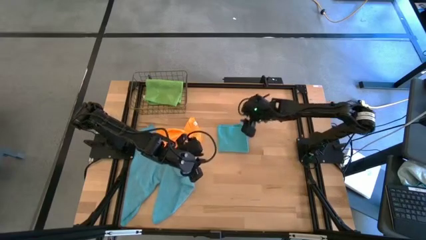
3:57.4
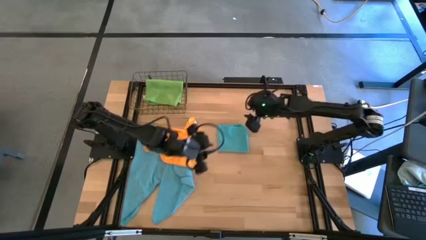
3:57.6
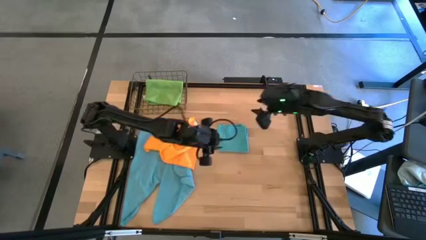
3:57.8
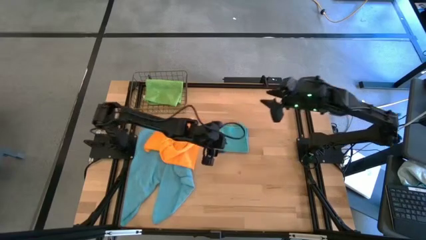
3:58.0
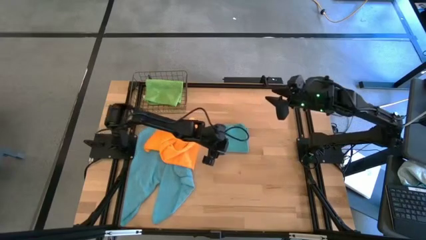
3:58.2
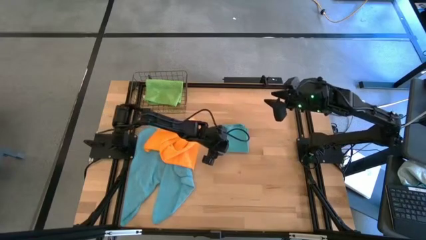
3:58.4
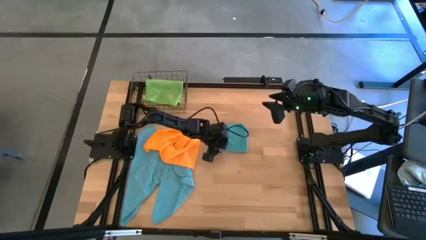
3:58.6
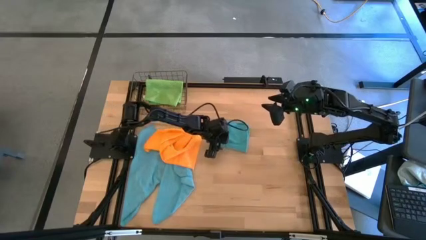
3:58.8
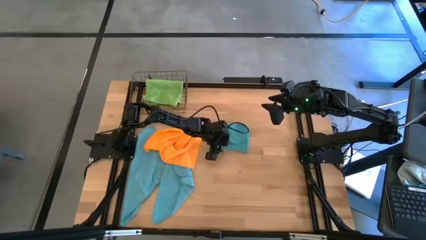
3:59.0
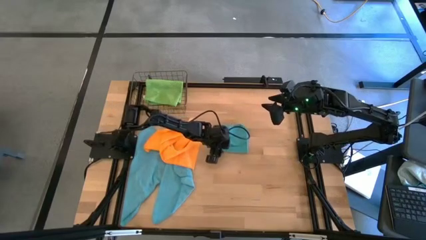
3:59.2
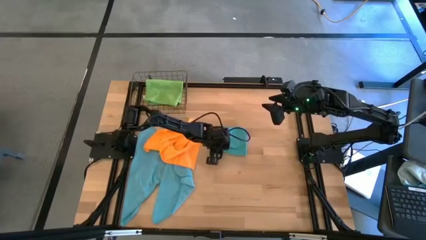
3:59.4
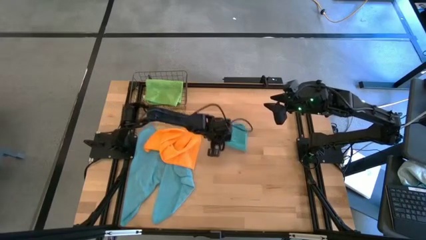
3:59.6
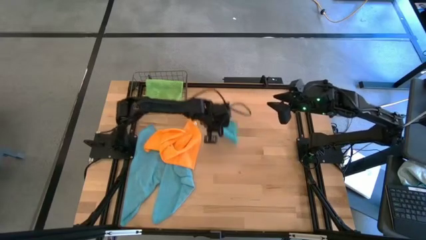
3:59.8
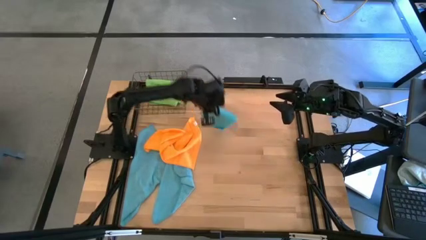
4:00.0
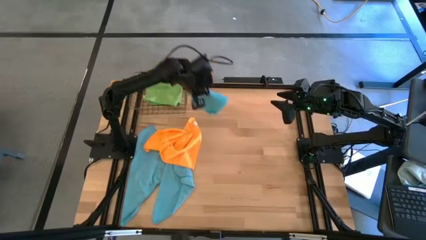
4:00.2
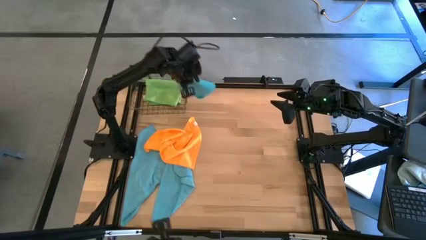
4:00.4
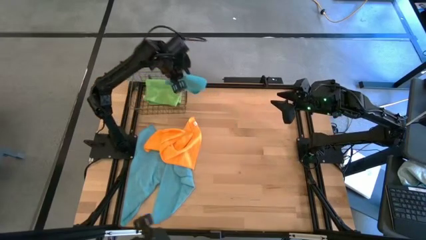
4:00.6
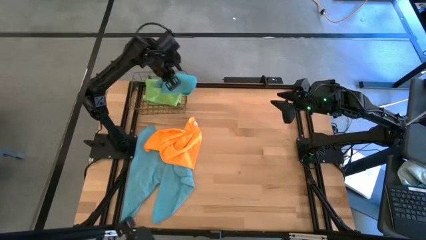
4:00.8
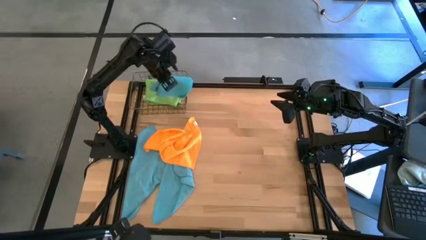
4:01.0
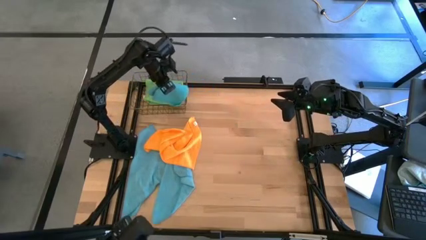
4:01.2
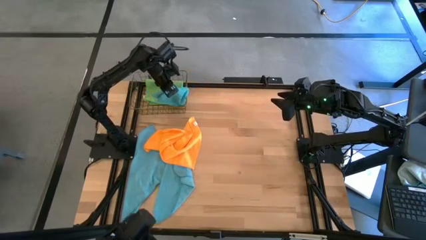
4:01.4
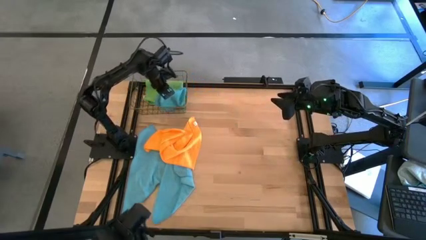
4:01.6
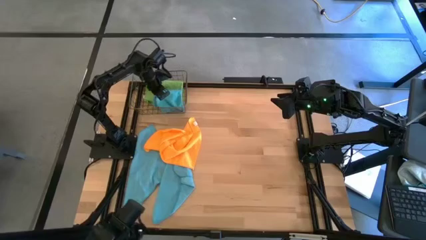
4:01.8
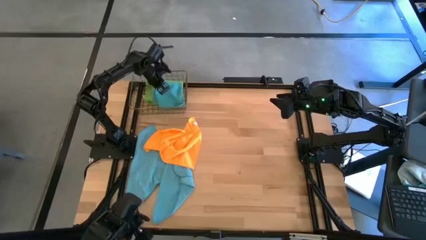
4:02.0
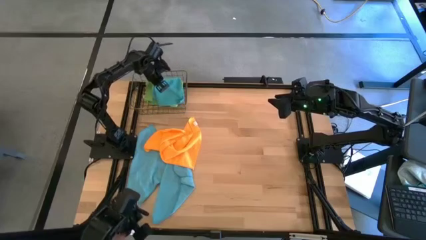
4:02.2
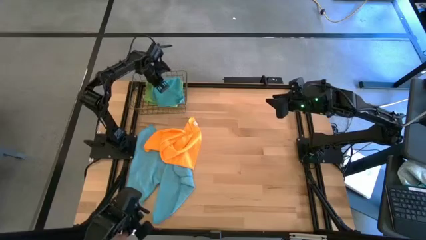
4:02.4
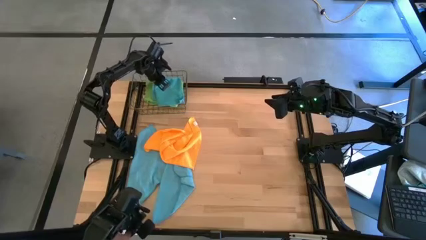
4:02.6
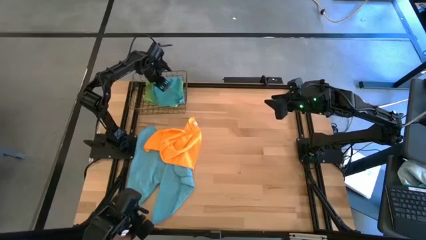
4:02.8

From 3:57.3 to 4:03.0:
Task: Fold microfiber towels
Put the folded blue microfiber cloth into the wire basket

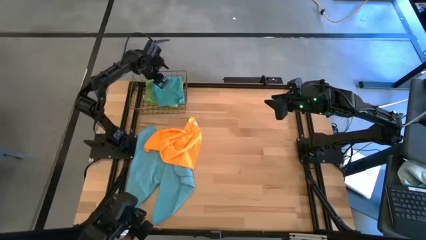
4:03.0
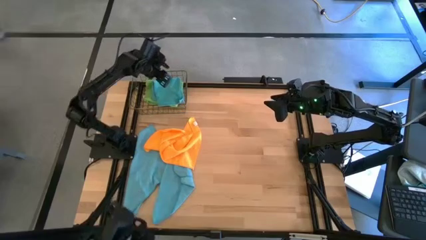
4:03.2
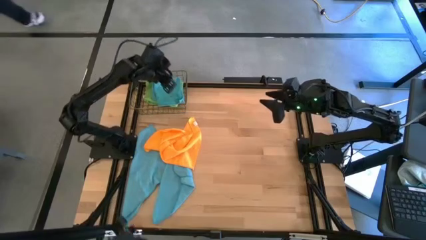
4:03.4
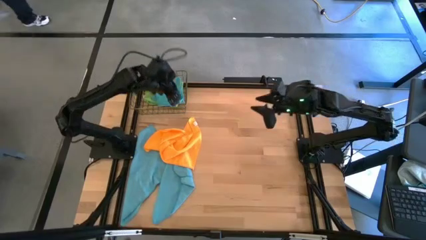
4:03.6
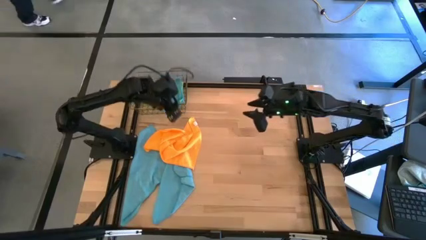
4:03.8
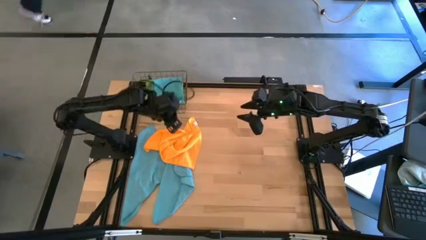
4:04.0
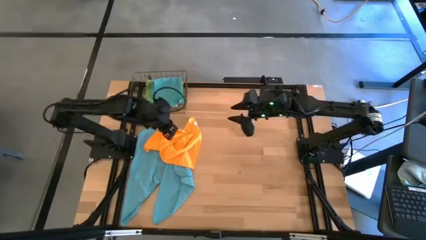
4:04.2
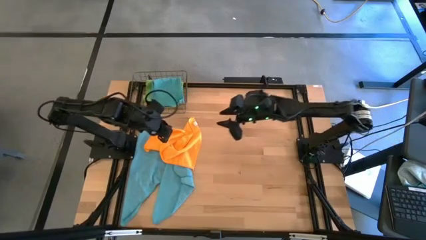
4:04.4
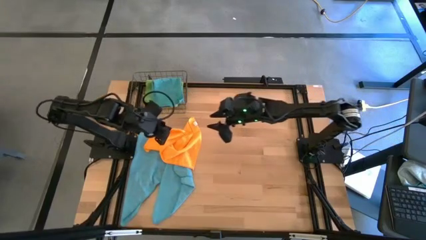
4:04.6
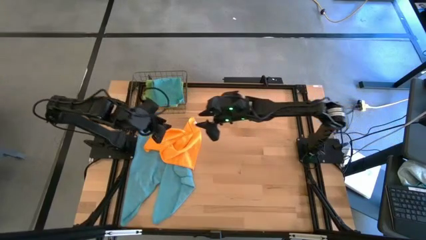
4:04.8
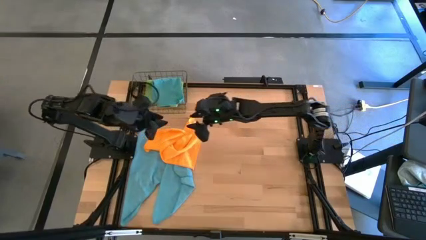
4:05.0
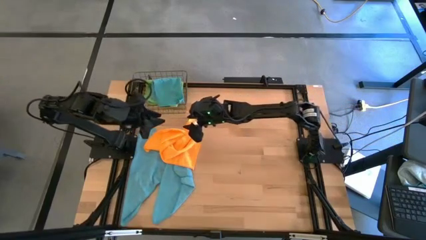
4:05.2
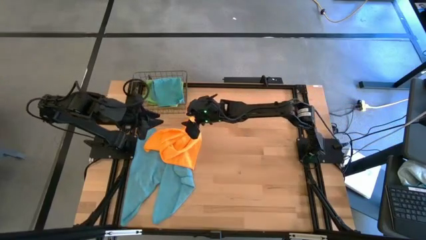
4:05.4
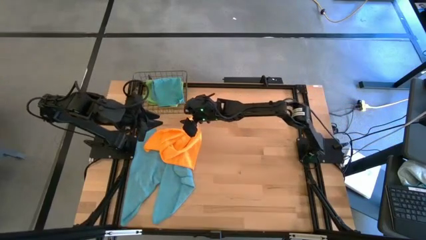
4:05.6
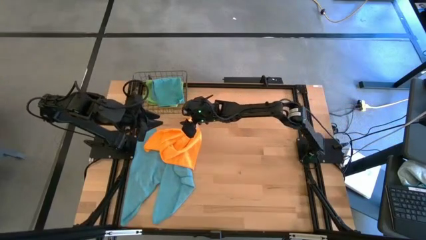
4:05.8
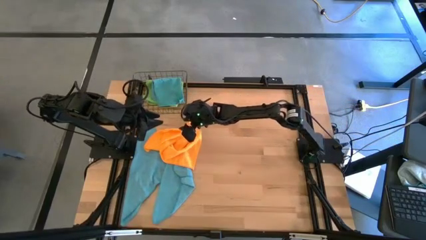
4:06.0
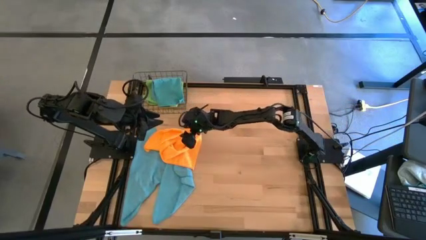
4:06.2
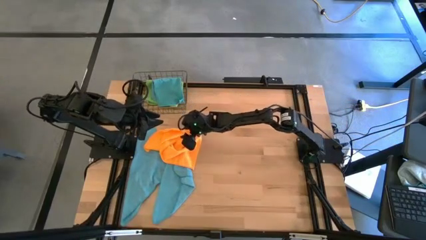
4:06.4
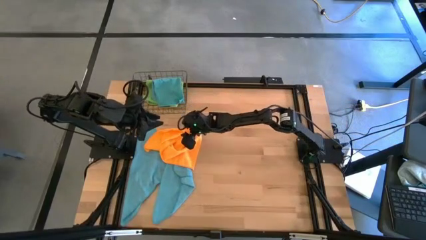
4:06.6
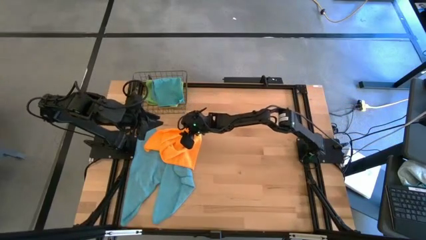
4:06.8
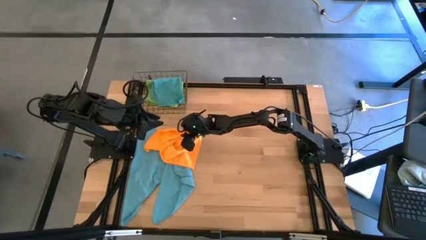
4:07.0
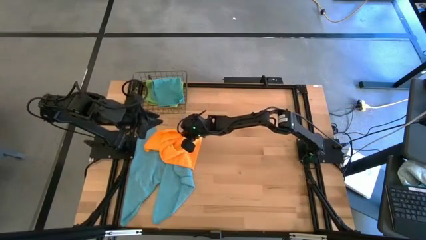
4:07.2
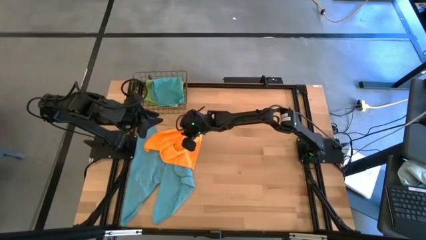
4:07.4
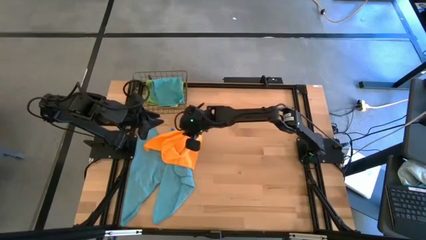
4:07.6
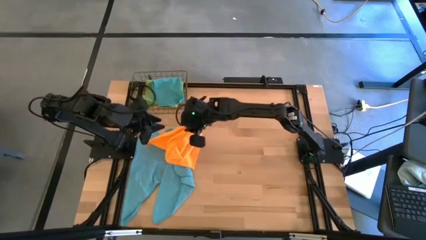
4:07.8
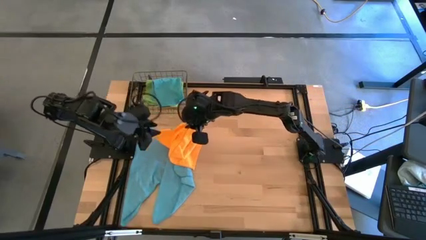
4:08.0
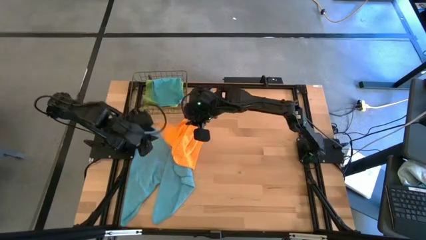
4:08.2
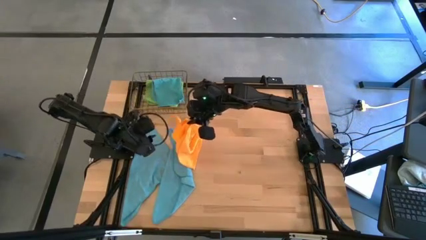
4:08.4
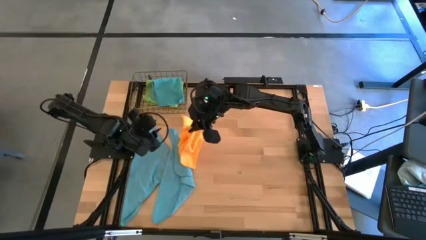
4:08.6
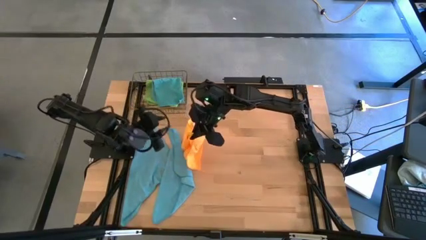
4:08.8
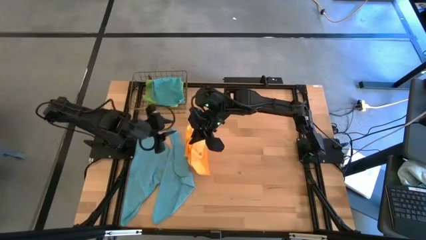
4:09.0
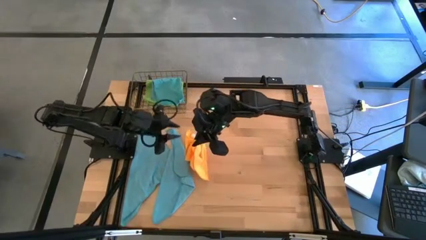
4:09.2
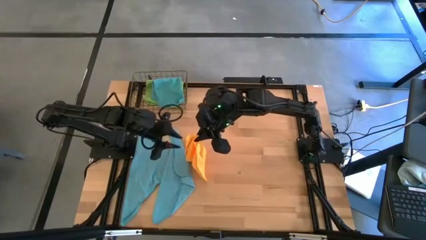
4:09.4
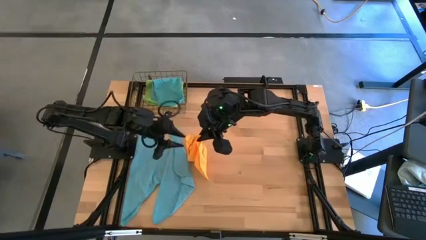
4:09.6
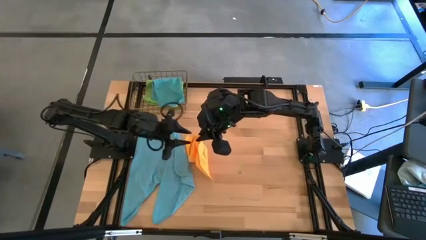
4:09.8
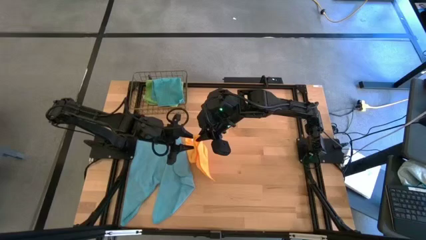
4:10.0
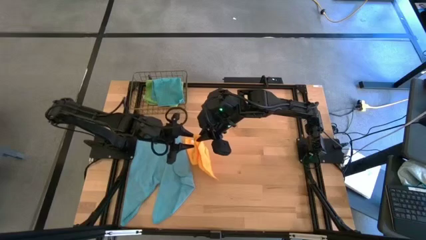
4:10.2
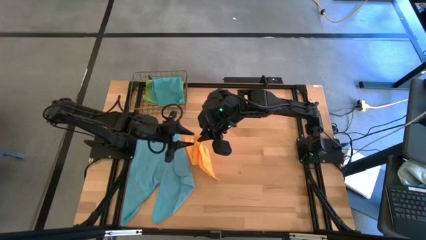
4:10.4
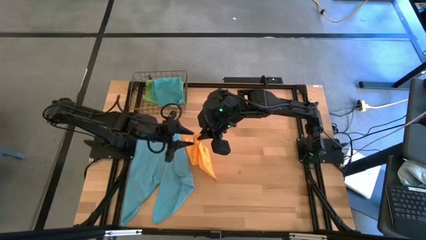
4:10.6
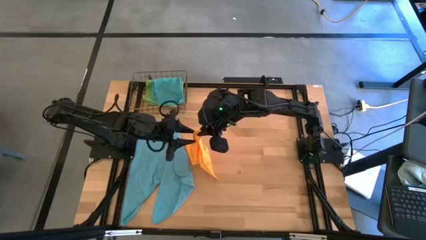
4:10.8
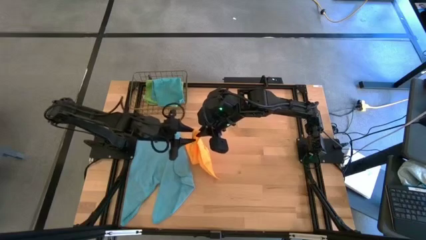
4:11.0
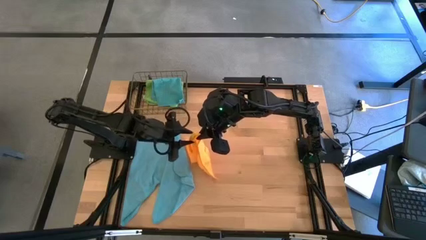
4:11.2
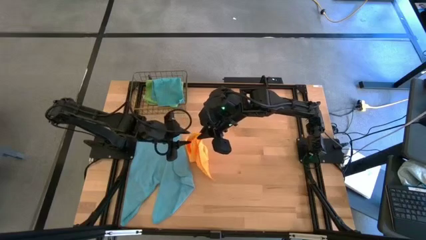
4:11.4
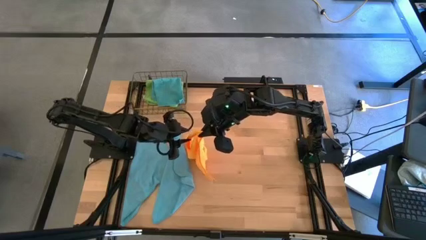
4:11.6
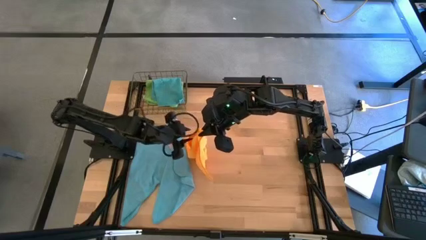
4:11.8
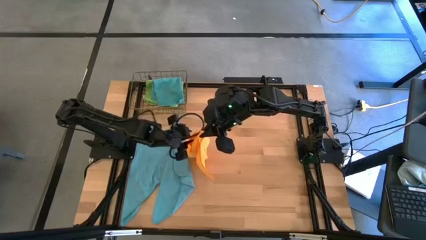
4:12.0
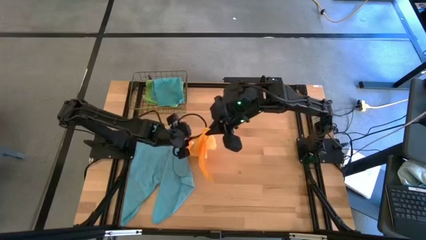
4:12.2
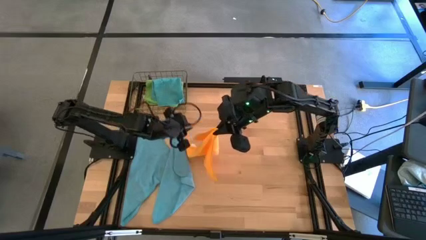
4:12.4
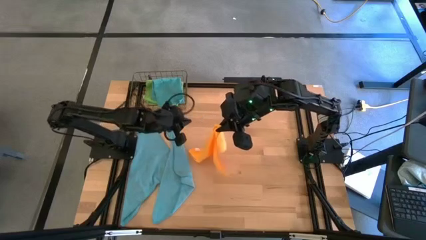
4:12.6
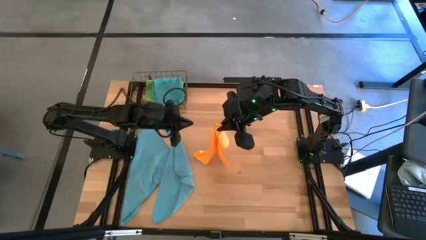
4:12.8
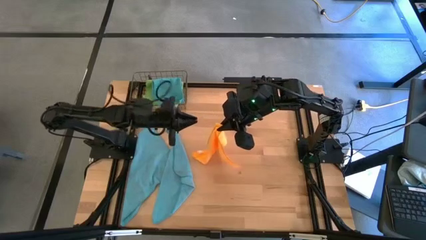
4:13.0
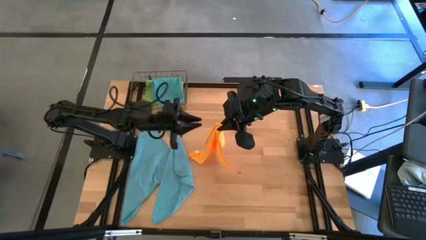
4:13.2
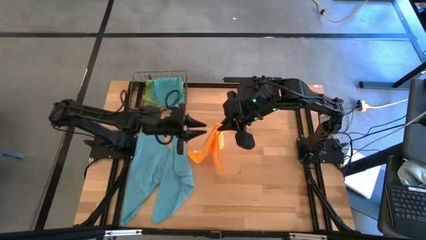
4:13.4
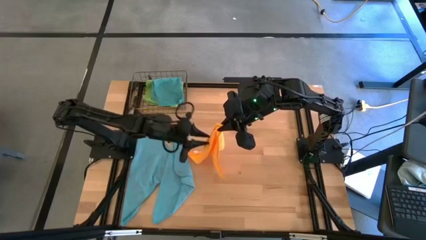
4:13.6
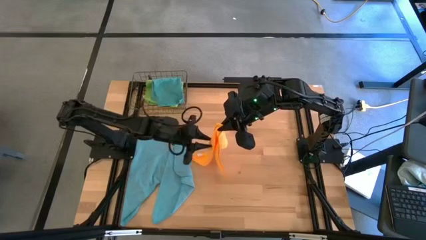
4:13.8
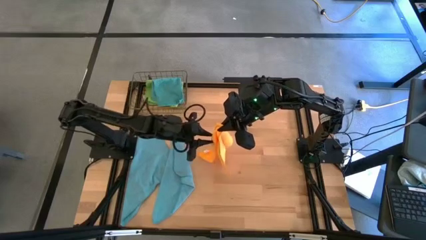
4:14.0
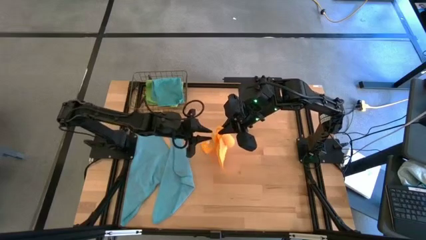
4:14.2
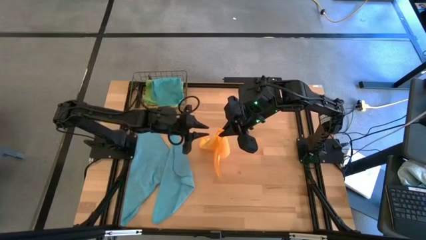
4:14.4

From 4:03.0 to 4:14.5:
Fold the orange microfiber cloth
